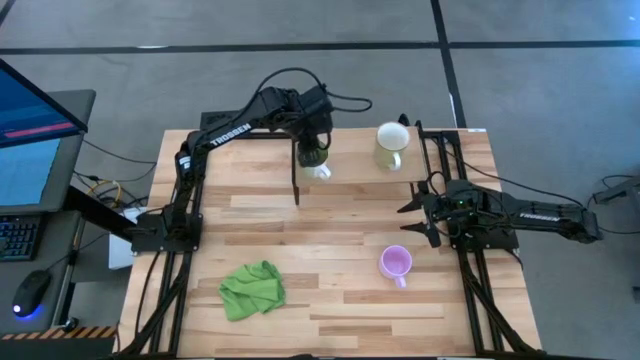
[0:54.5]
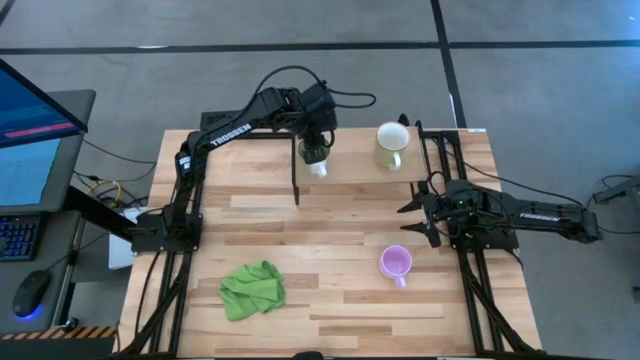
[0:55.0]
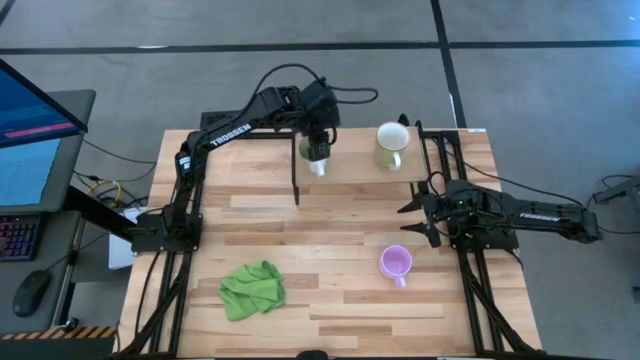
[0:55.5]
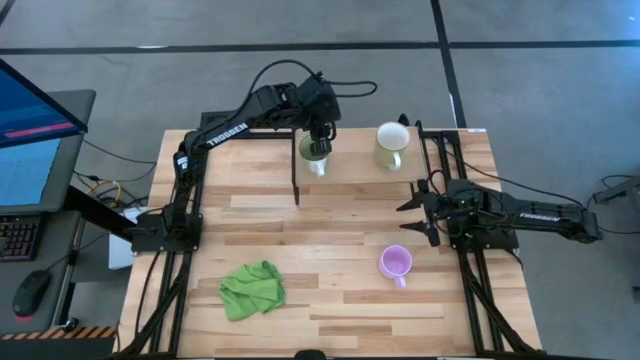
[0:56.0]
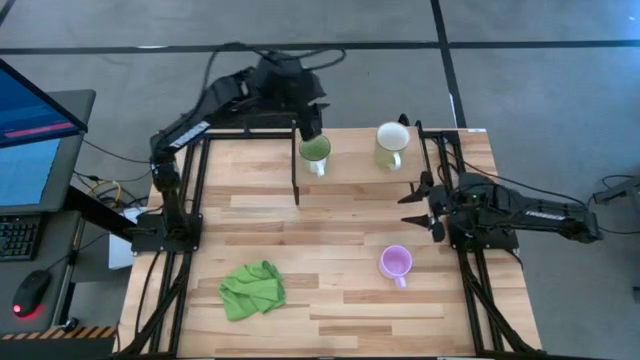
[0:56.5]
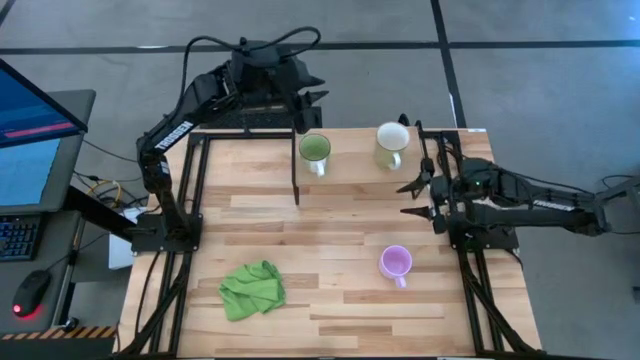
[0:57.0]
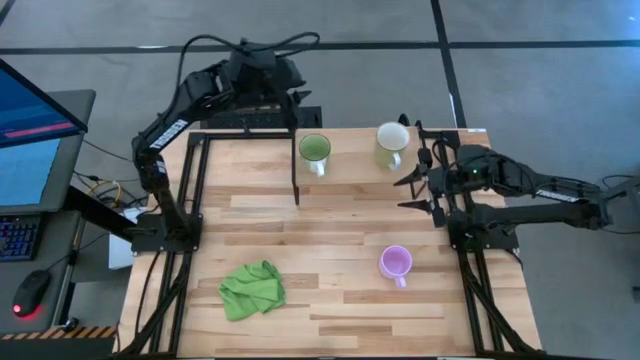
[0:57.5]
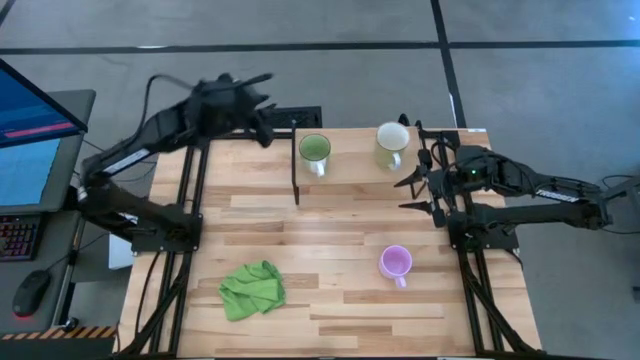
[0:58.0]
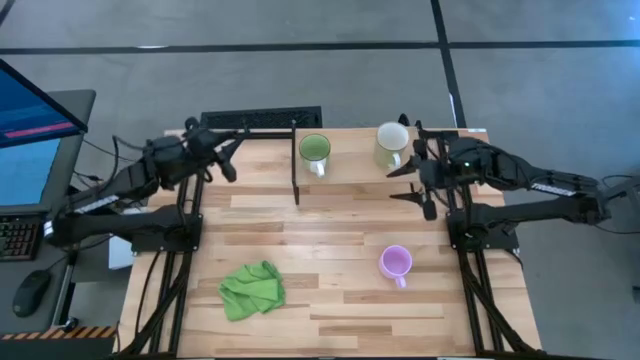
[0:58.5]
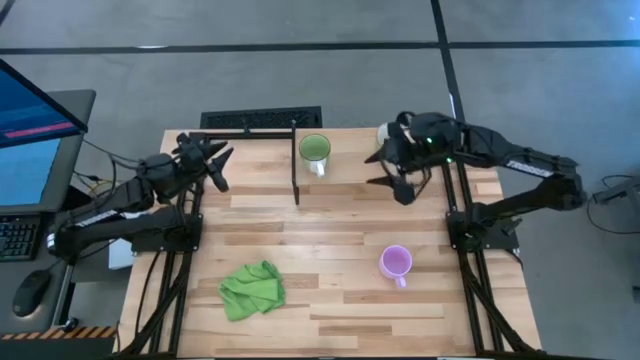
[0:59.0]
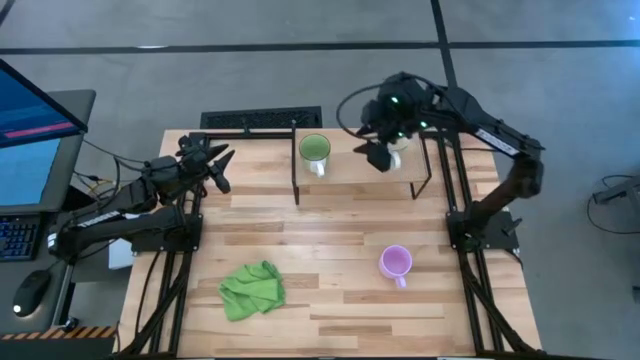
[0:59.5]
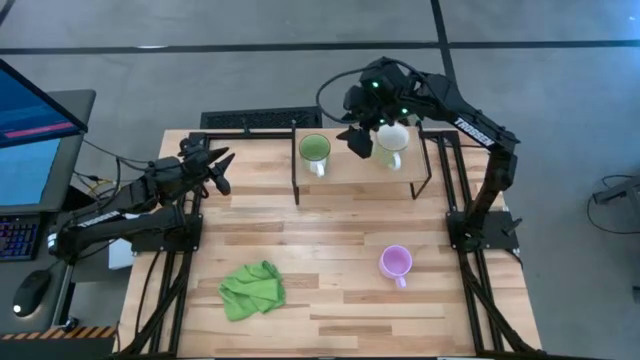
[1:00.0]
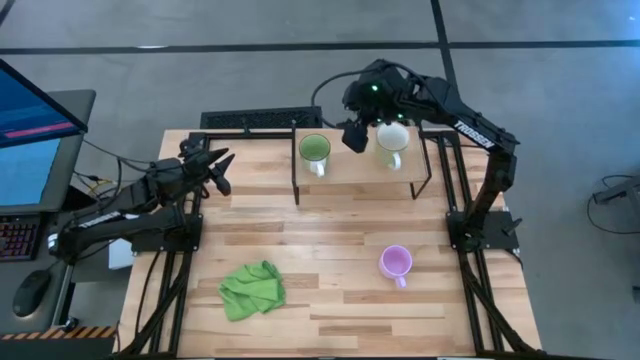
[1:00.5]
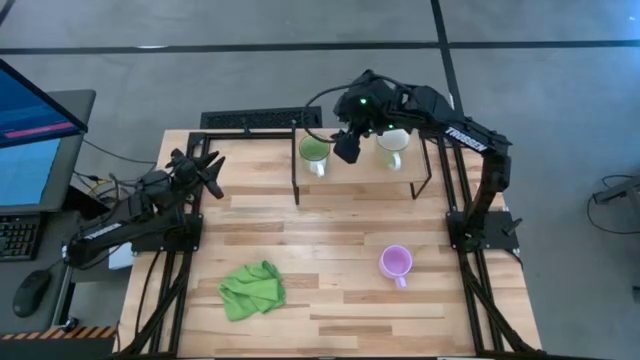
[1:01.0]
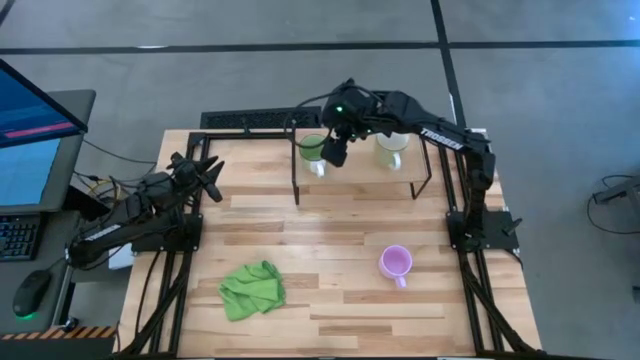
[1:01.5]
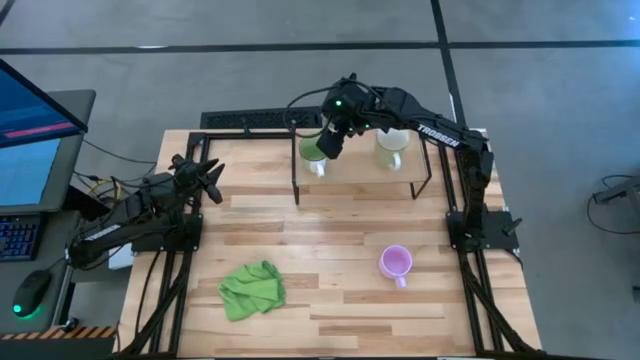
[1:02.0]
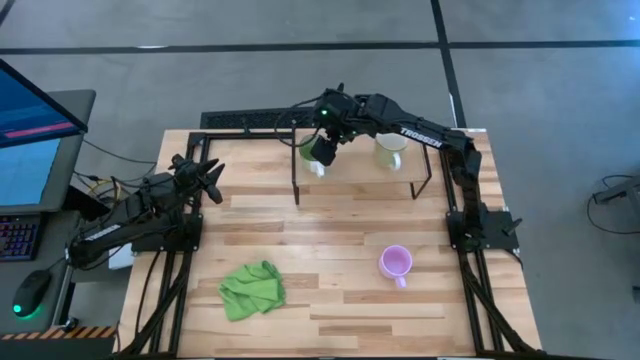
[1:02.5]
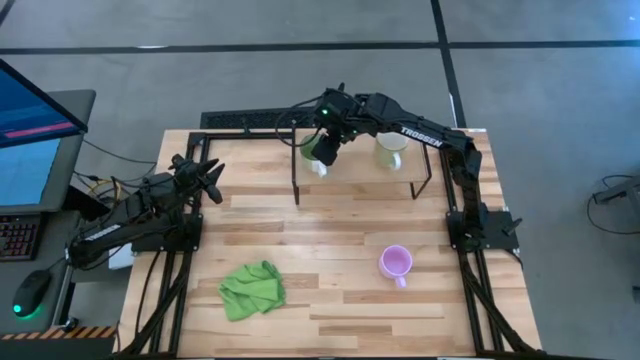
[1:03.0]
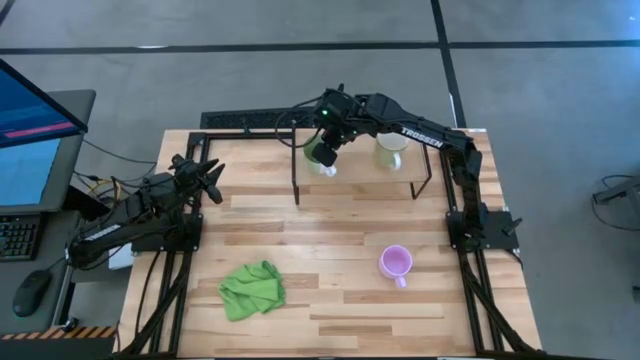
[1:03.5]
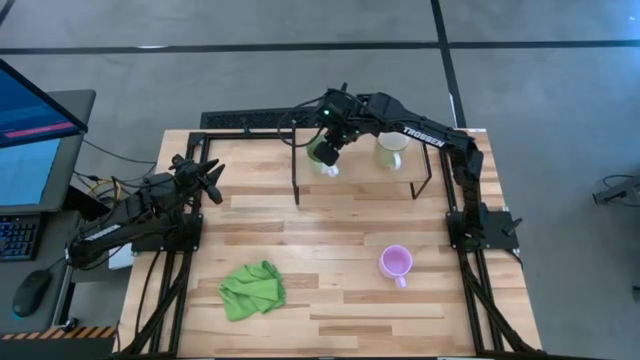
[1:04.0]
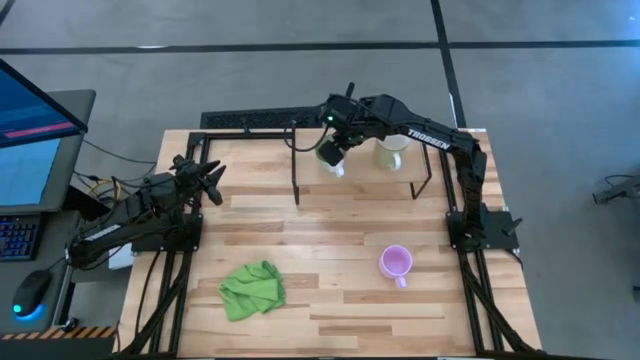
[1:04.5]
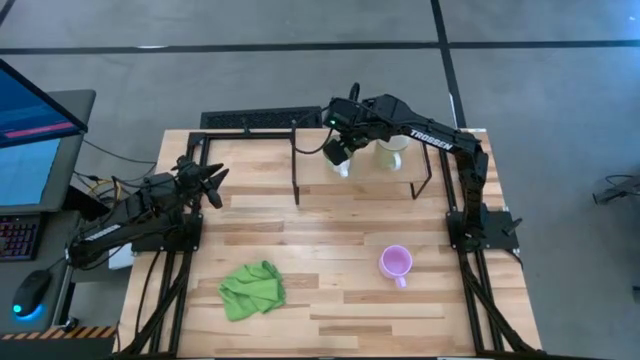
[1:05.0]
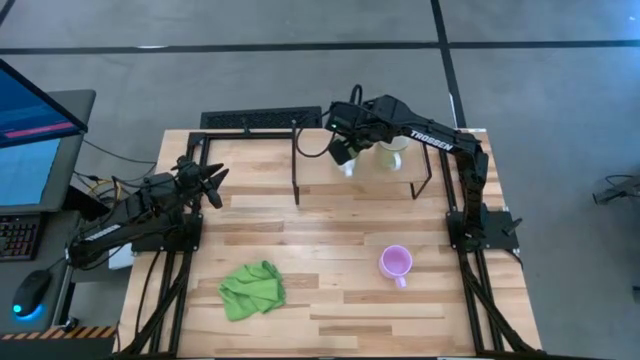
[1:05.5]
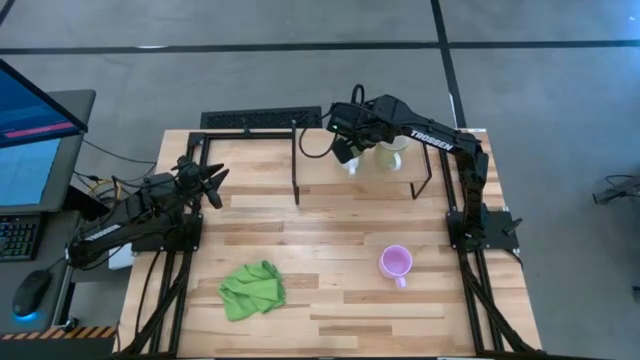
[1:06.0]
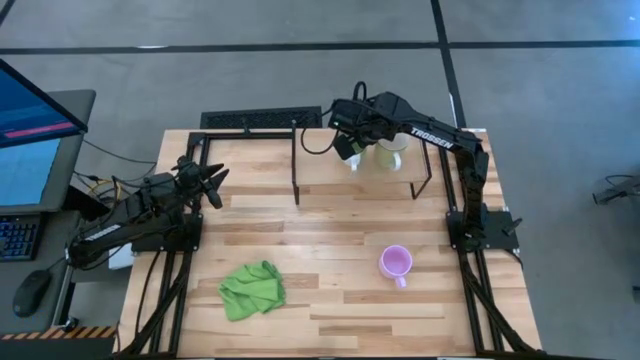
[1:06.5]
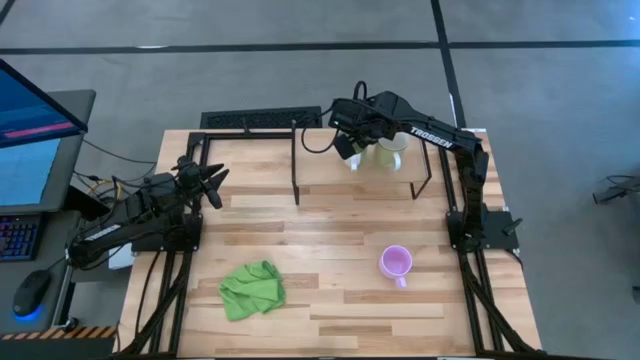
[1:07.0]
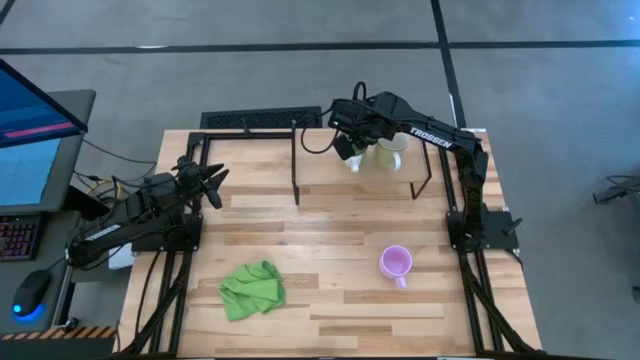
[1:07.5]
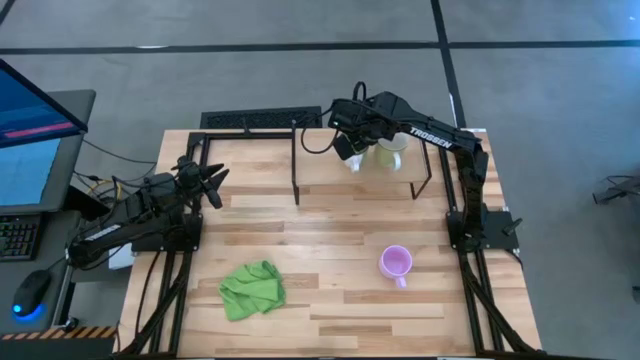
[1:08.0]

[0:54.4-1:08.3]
Task: Stack small to large cups/mugs on shelf
Adjust the green mug on the shelf

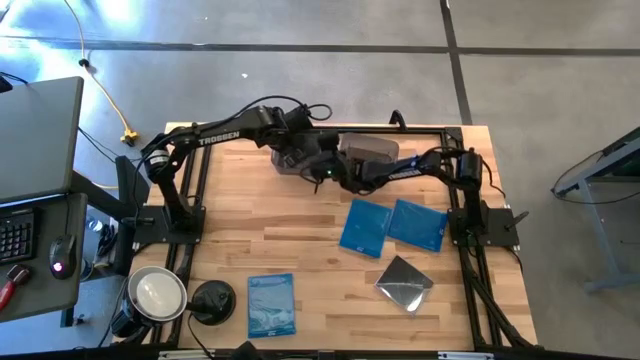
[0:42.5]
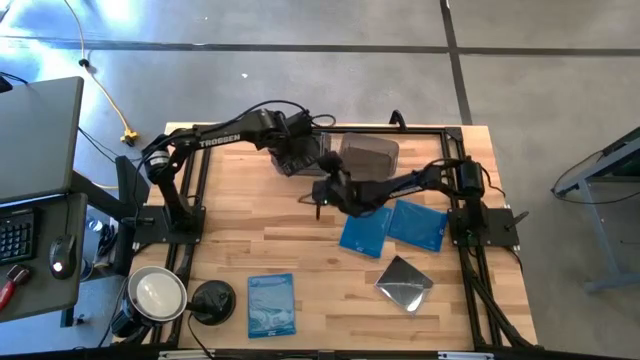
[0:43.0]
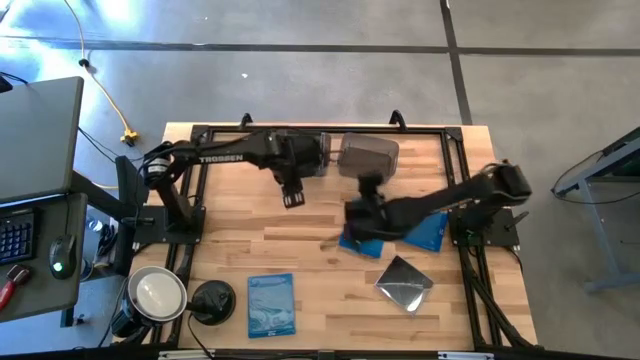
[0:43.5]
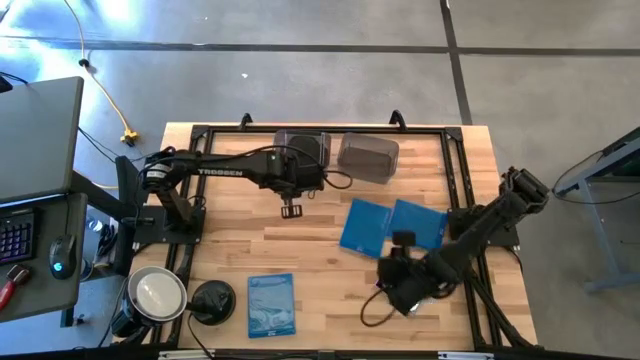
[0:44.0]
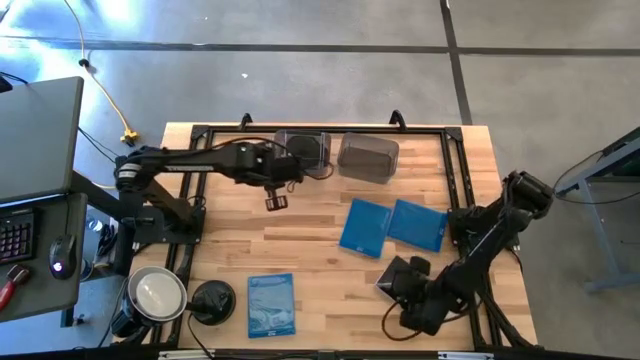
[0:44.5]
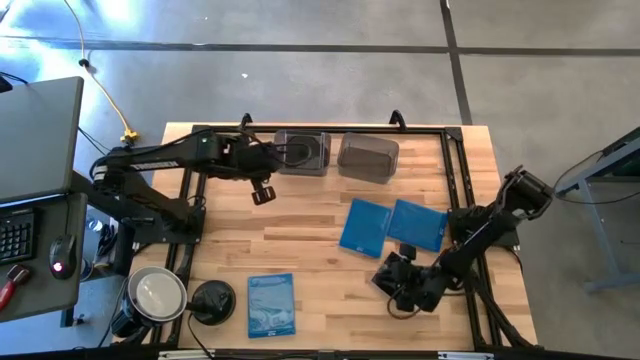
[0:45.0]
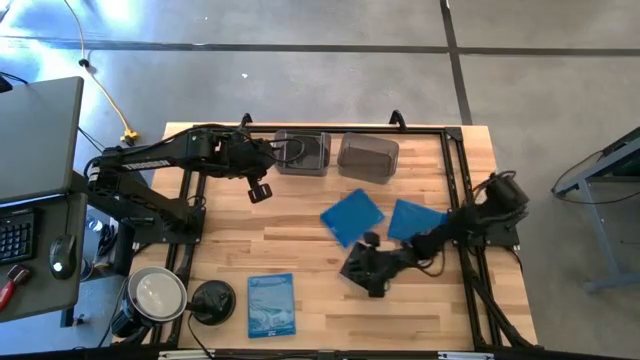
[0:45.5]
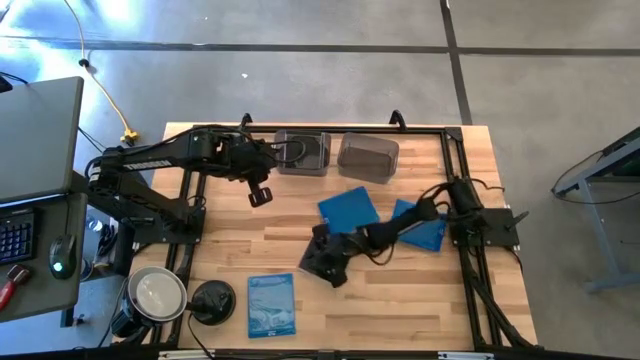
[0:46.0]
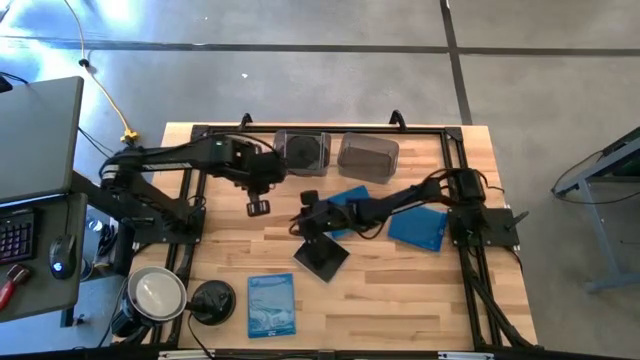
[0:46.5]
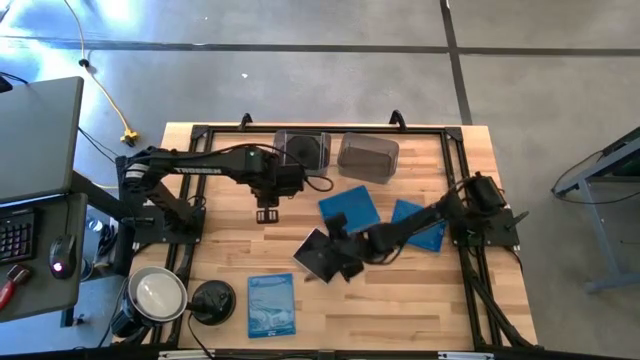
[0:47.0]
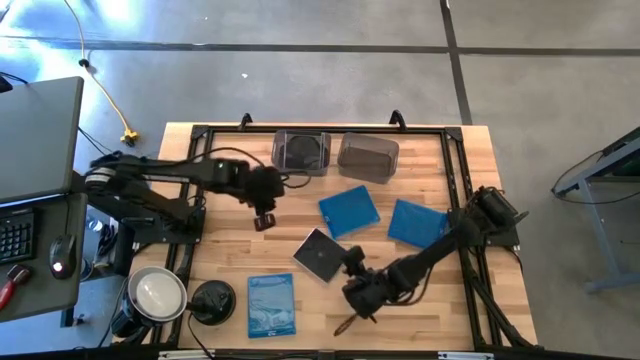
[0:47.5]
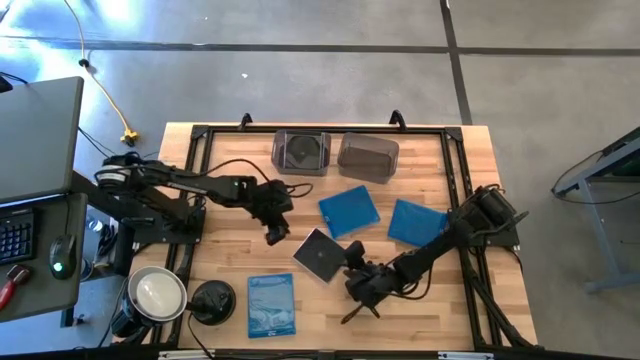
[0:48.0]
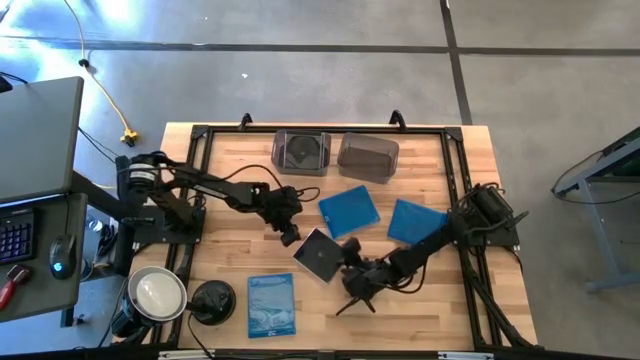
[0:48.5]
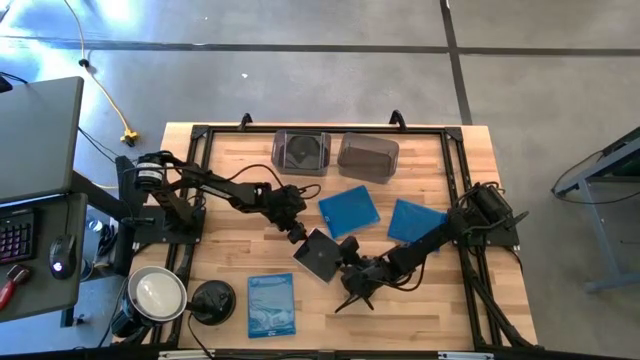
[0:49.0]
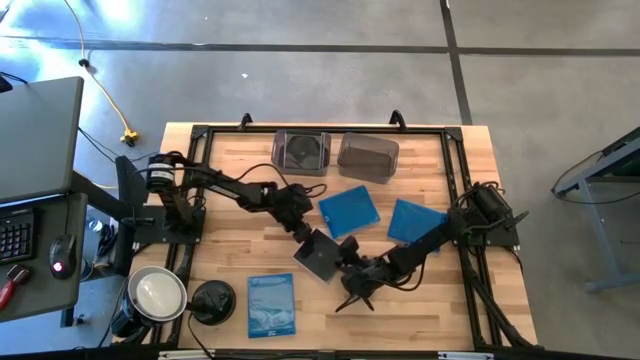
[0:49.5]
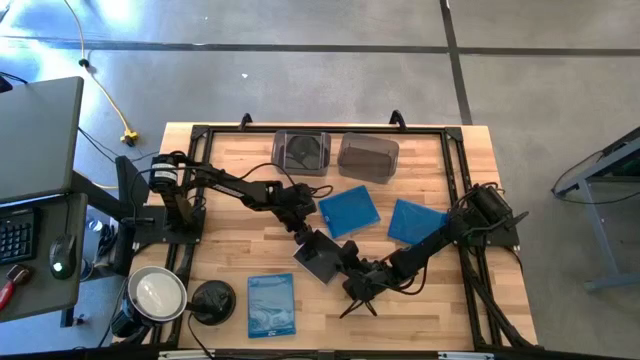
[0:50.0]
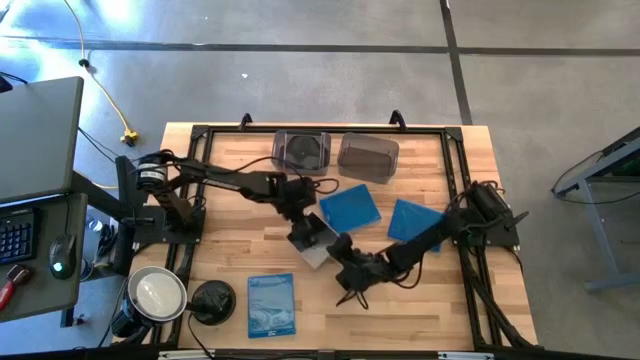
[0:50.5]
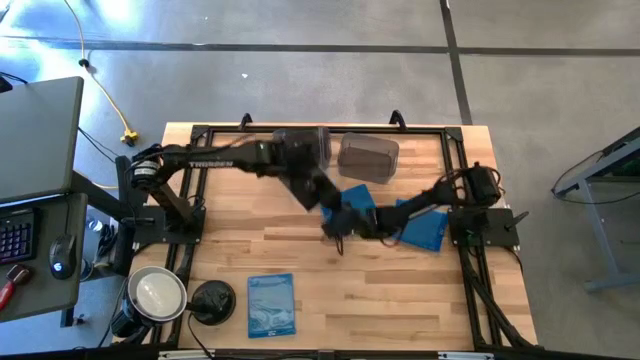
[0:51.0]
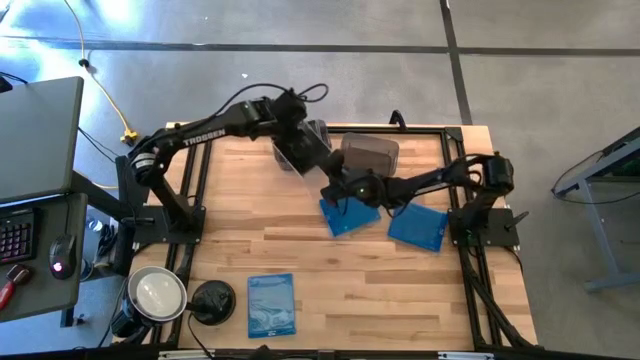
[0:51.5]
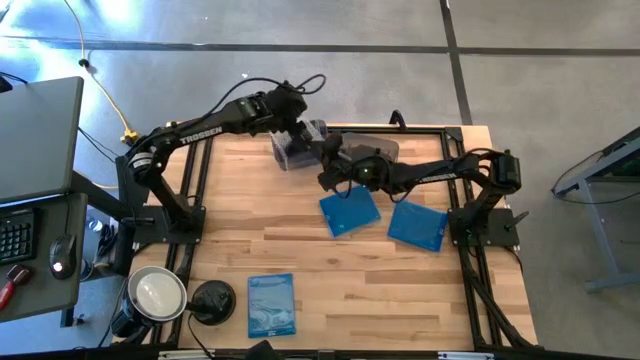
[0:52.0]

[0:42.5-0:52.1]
Task: Pick & place jewel cases by type
Put the black cd case into the left black bin
